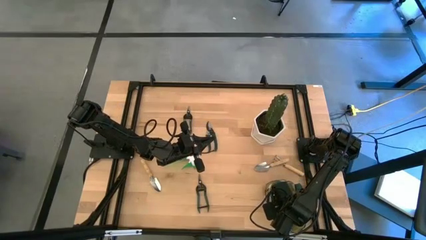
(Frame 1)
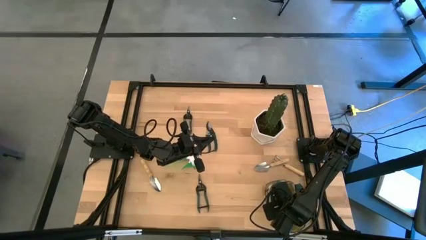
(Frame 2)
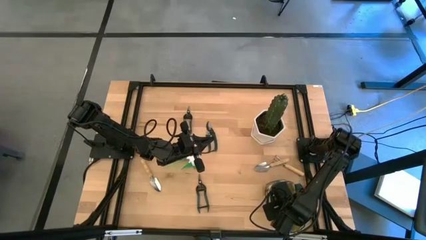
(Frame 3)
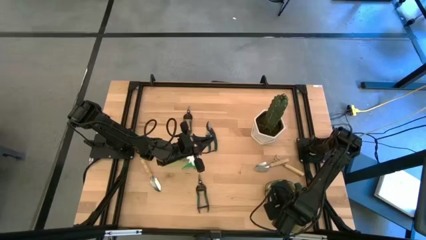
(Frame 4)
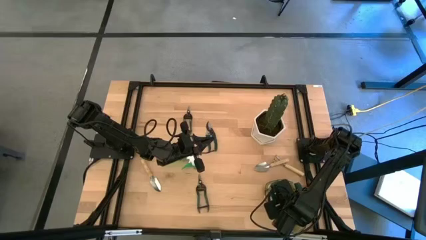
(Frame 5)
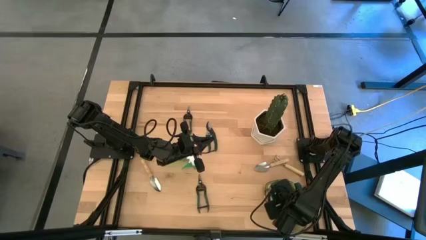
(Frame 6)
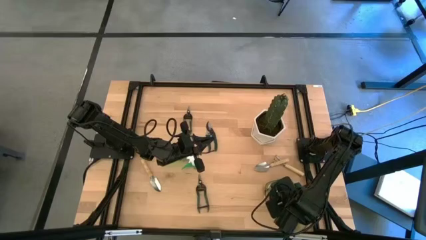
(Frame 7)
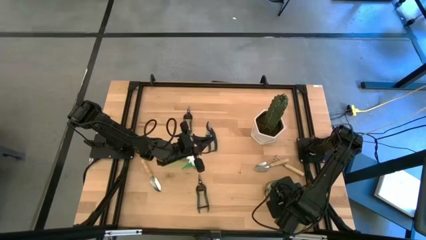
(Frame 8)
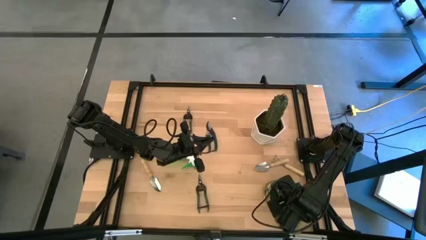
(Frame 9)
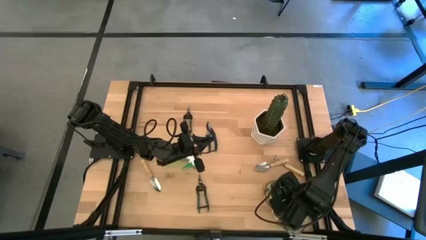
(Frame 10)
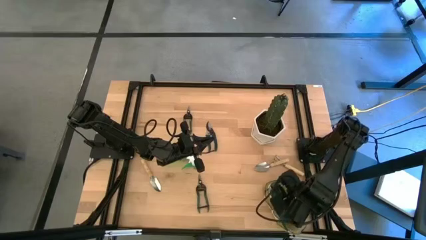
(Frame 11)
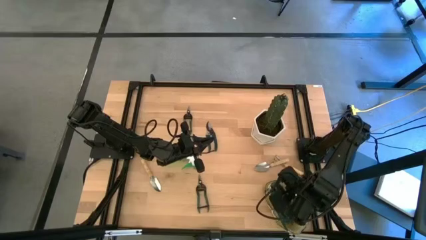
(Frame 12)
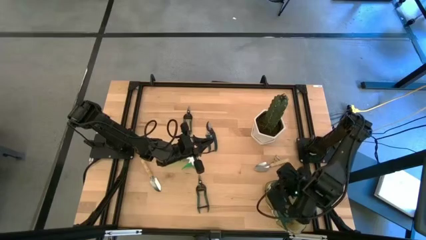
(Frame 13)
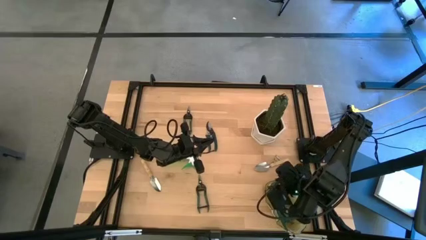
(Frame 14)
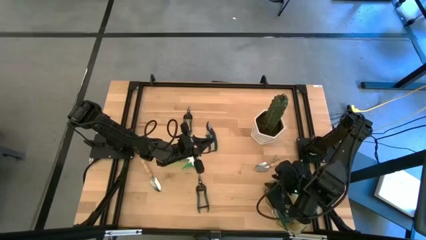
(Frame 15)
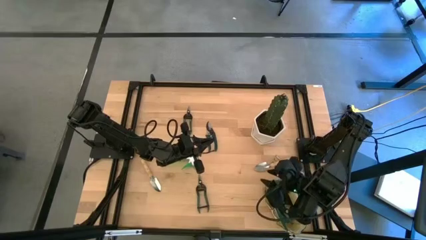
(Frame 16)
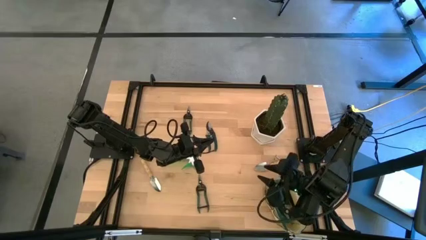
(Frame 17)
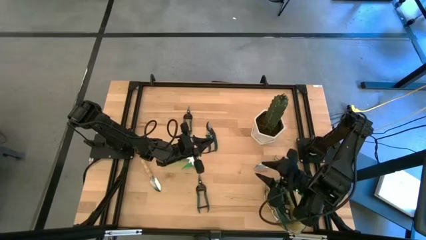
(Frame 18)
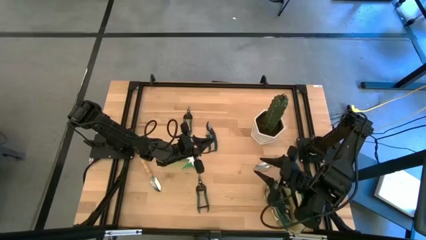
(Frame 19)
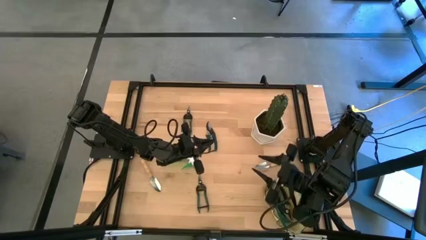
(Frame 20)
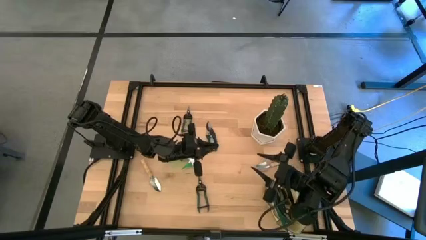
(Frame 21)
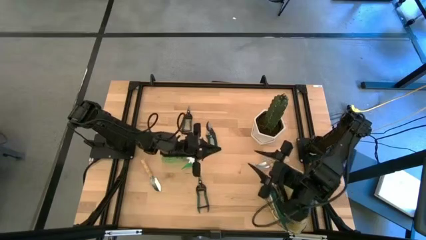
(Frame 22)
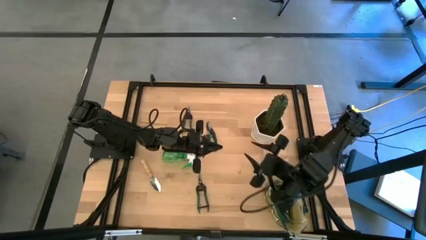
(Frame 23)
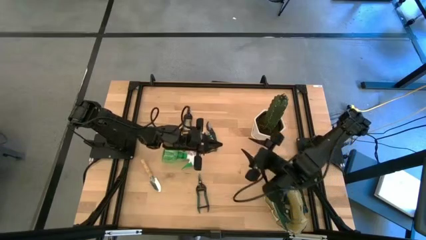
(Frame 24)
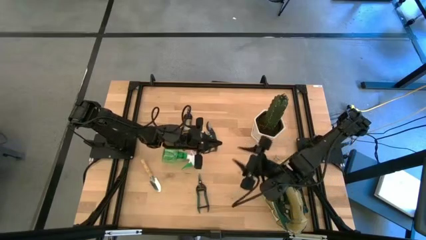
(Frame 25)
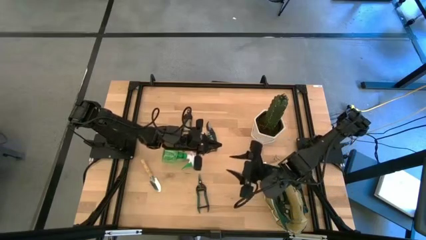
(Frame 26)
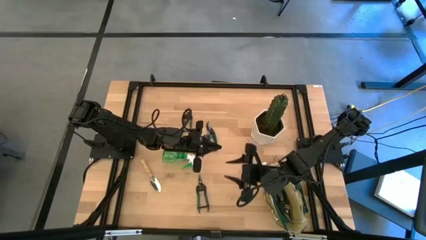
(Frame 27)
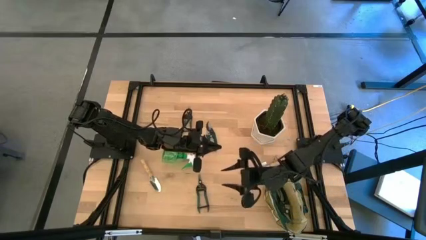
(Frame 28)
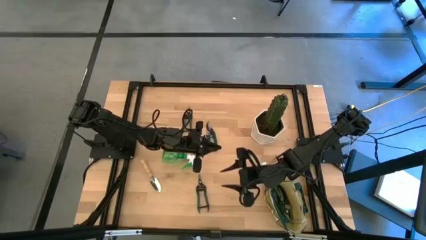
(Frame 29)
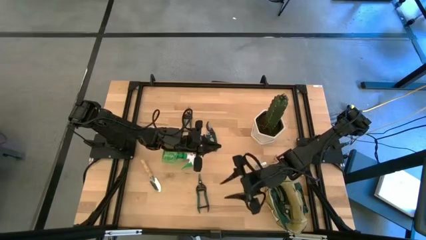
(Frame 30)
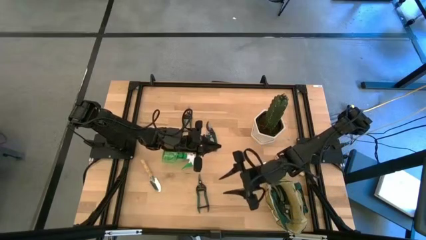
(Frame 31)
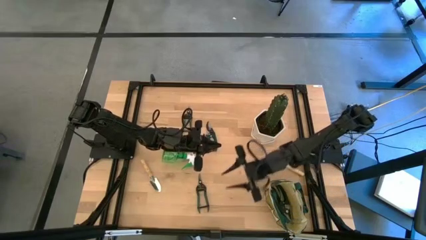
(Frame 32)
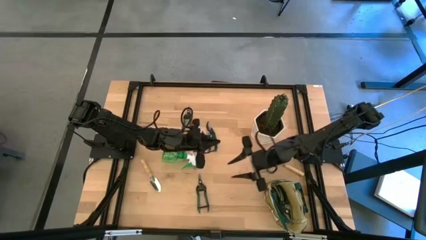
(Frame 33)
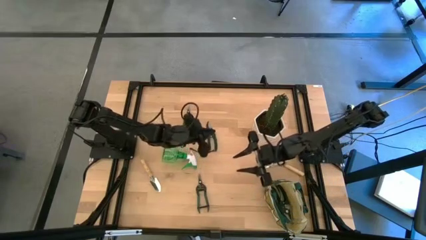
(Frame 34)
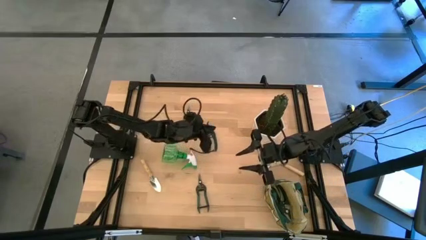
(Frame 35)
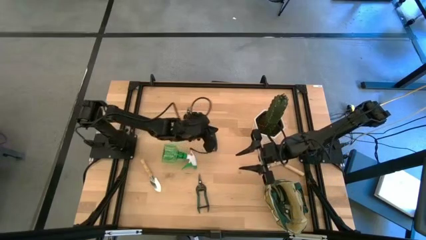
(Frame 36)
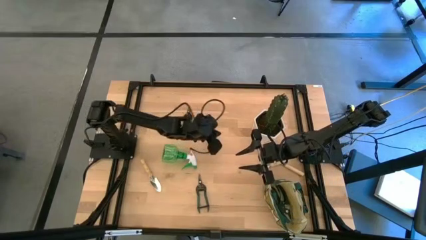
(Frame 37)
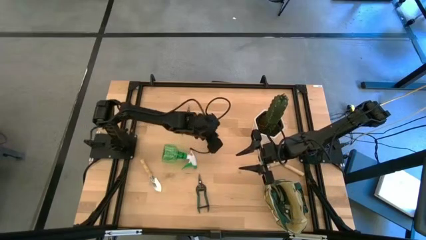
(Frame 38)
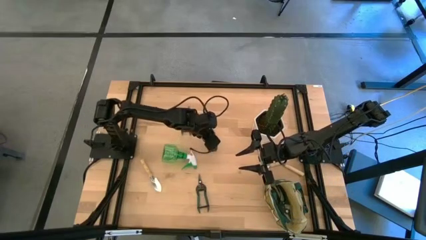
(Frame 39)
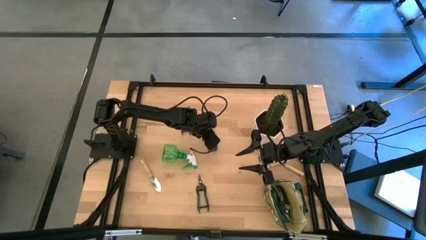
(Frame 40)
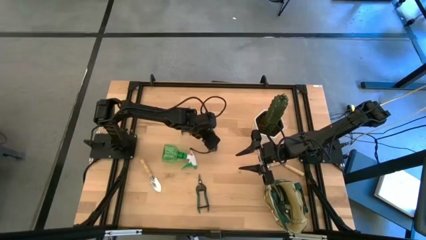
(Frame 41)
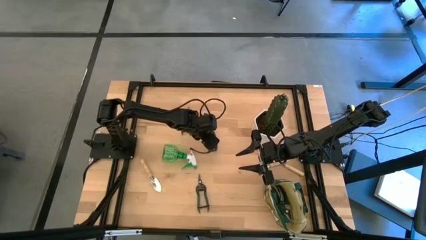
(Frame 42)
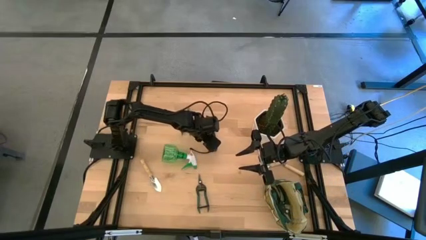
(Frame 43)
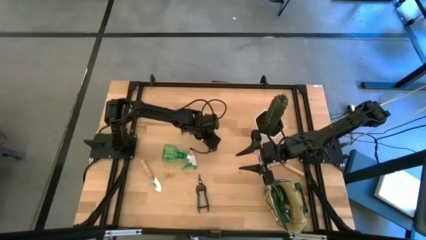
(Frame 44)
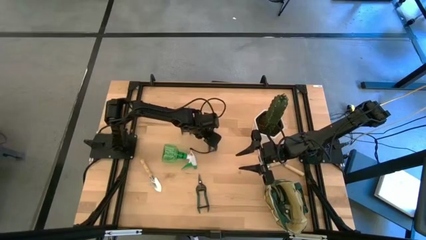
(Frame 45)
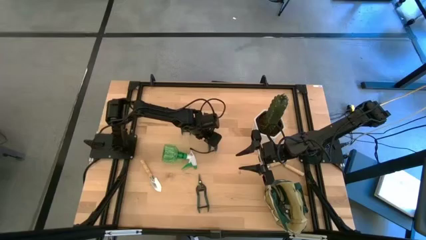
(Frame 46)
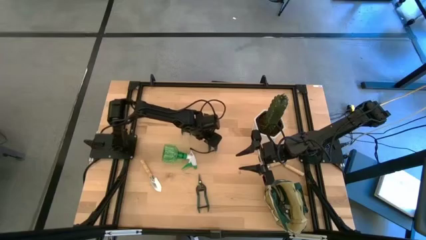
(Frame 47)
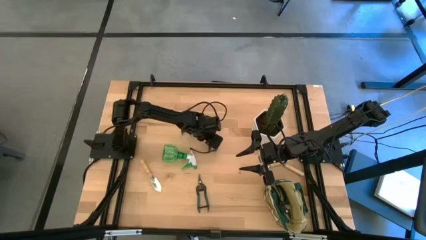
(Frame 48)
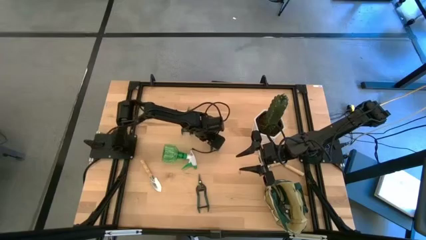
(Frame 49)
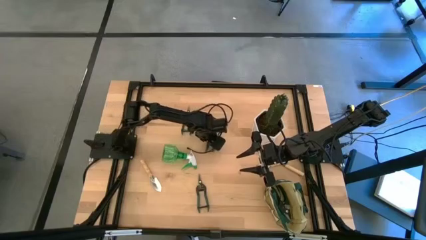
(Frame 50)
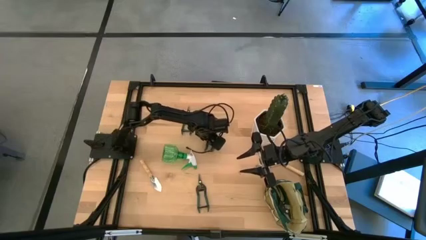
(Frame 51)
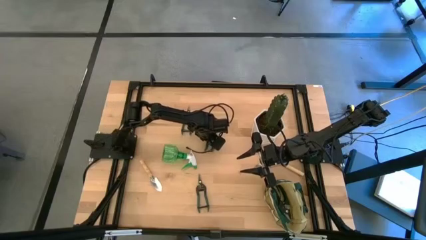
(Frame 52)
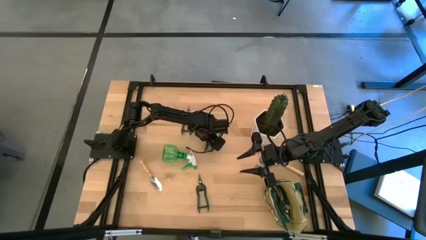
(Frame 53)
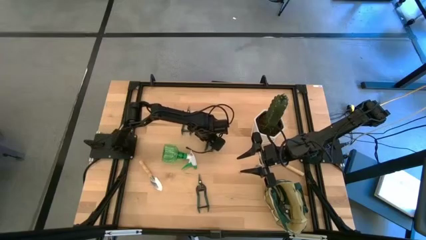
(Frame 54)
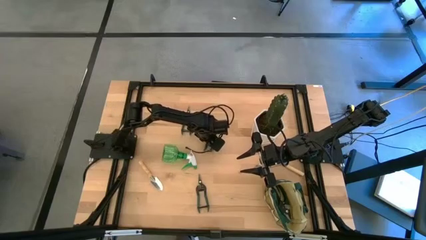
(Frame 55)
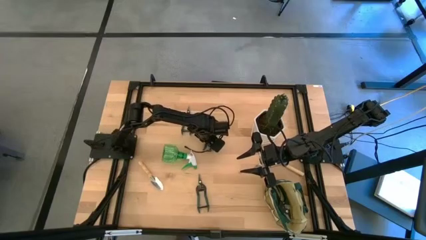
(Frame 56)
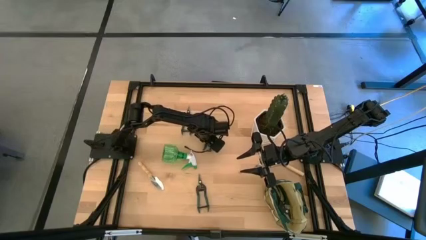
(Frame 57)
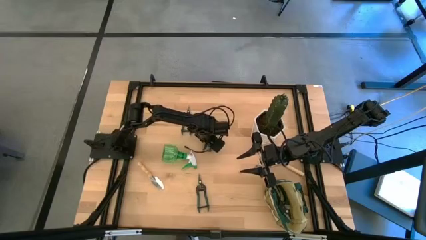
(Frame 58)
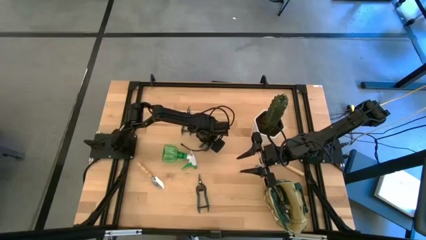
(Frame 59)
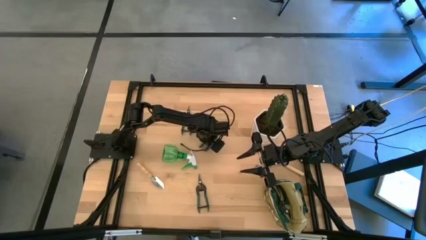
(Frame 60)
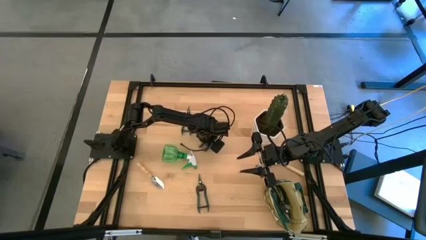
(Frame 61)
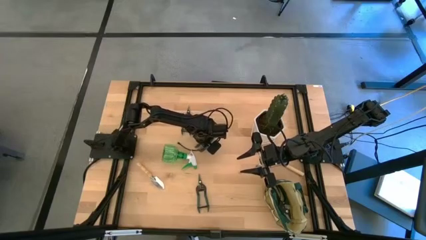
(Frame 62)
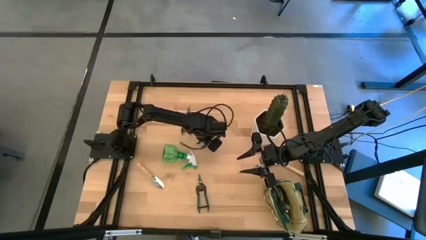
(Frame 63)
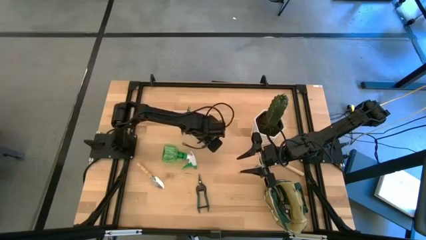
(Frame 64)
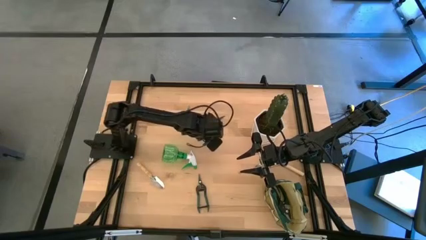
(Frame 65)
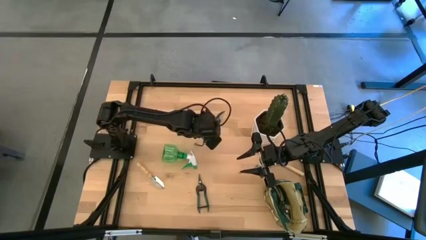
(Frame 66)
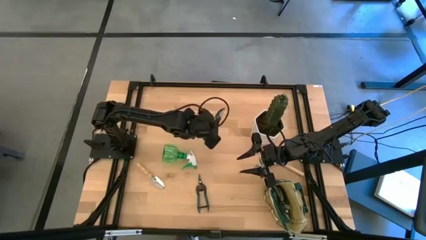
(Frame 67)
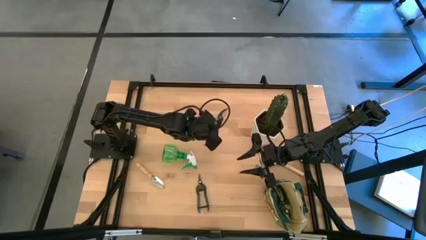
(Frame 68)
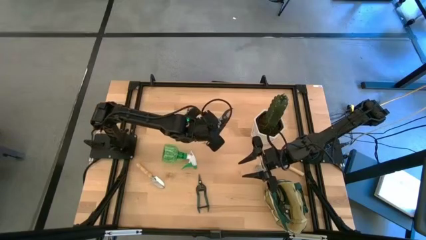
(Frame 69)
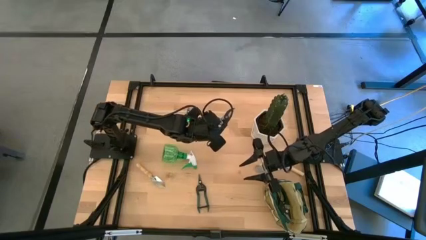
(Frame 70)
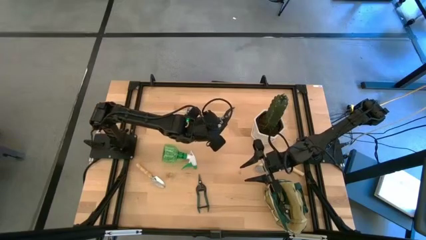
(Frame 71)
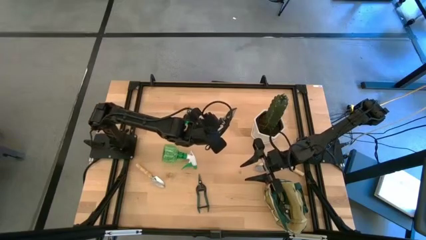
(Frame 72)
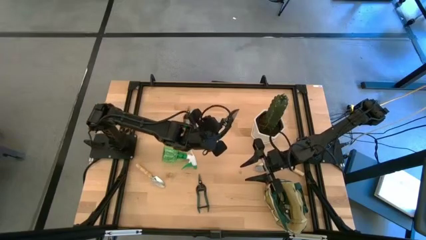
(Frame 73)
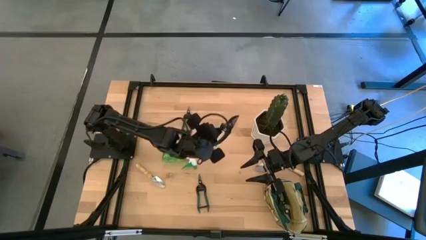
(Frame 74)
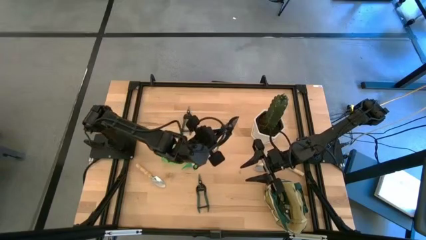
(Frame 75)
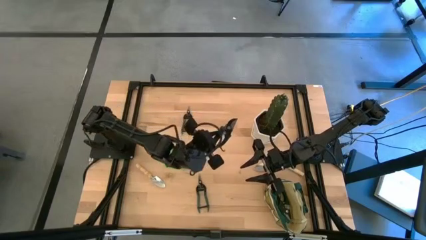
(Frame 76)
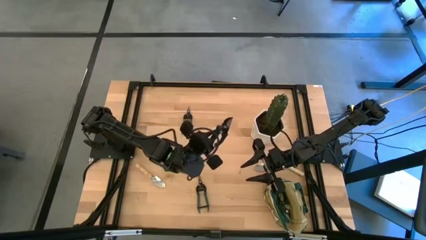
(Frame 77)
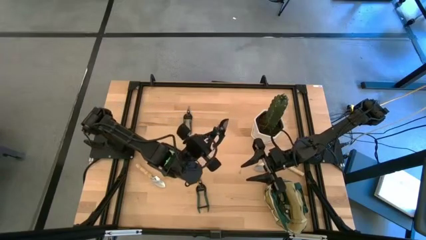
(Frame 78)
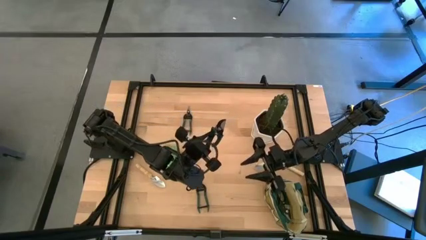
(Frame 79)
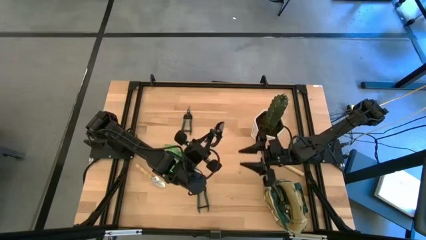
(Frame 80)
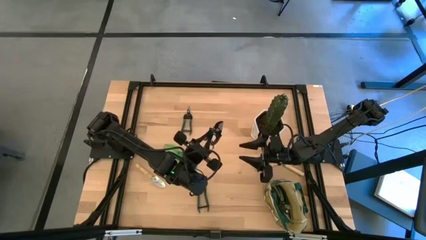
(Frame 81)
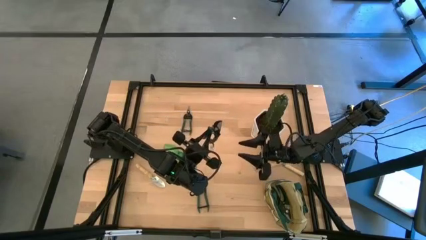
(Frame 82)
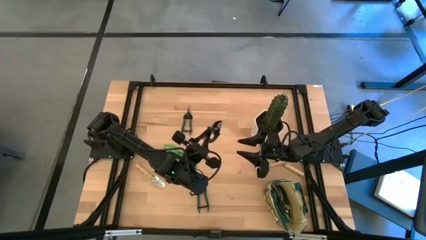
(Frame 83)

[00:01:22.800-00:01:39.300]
Task: Pick & Place Garden tools in Gardening bag
Put the hand pruner into the white bag
